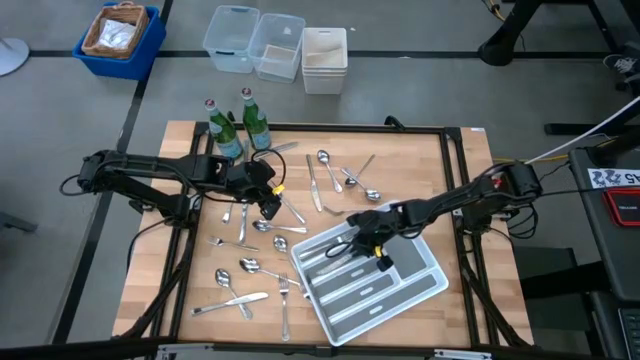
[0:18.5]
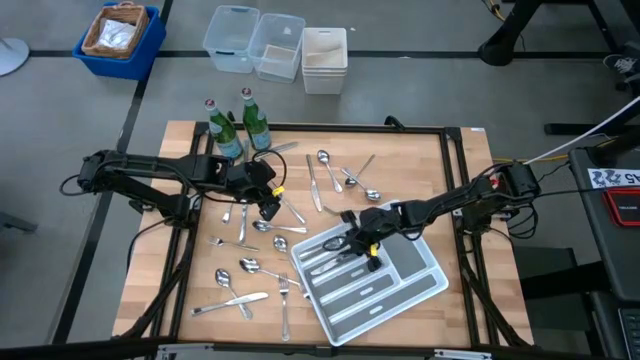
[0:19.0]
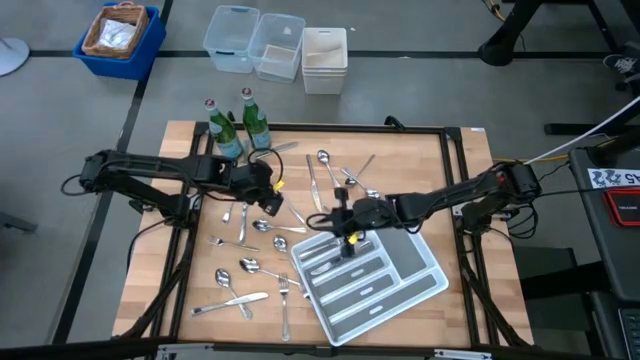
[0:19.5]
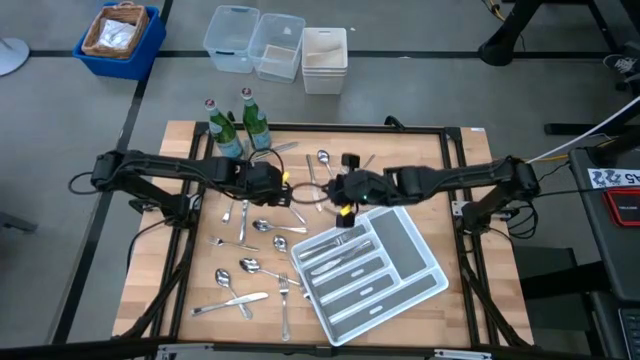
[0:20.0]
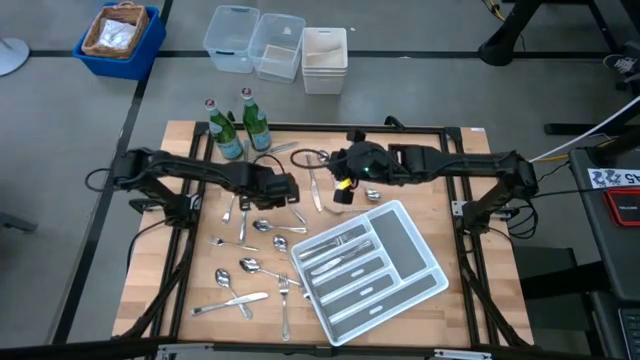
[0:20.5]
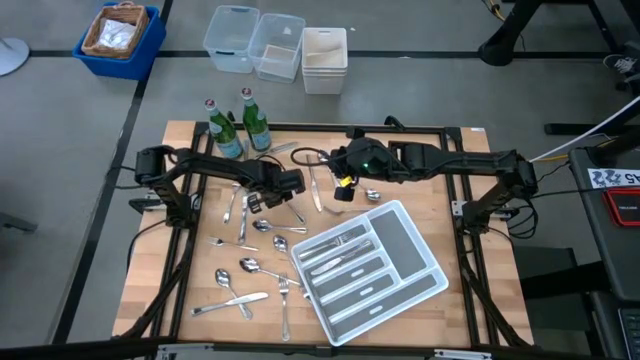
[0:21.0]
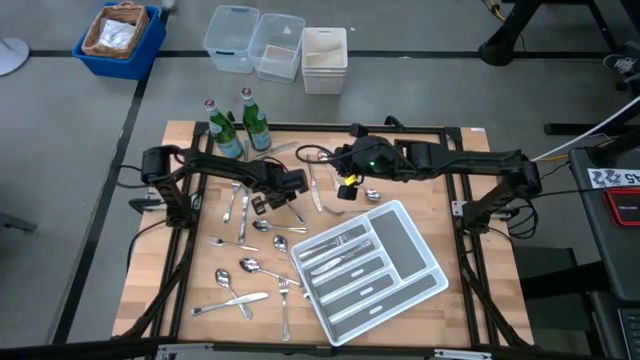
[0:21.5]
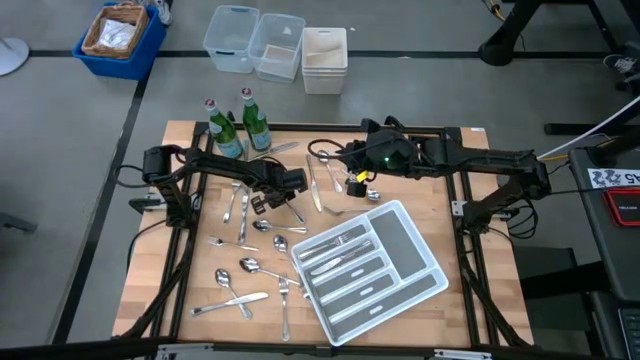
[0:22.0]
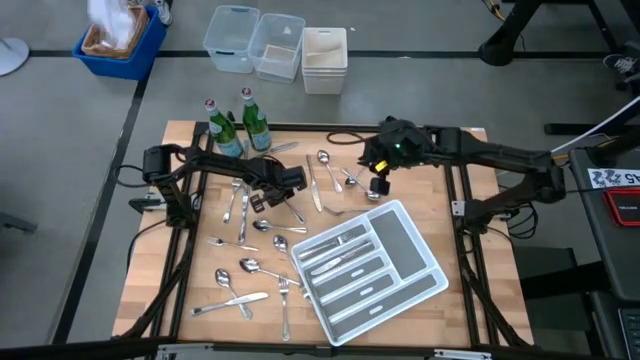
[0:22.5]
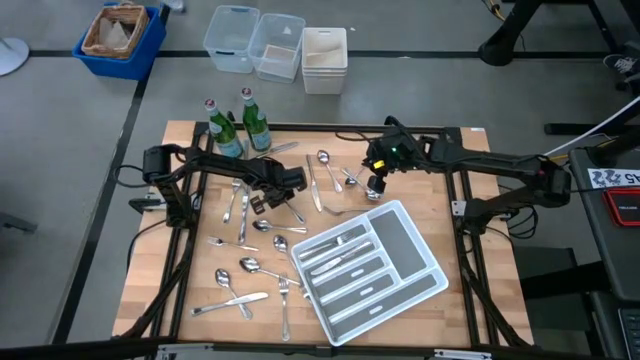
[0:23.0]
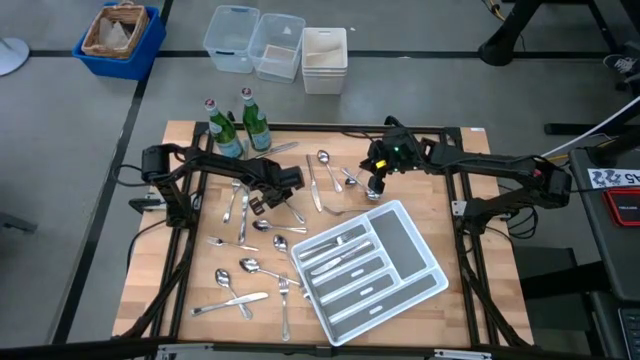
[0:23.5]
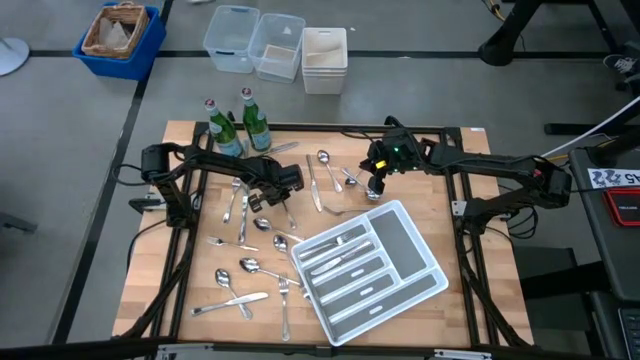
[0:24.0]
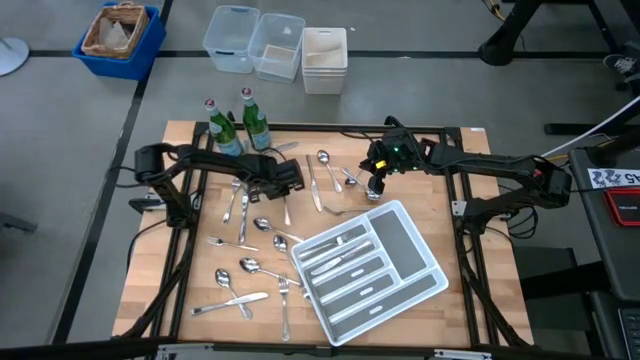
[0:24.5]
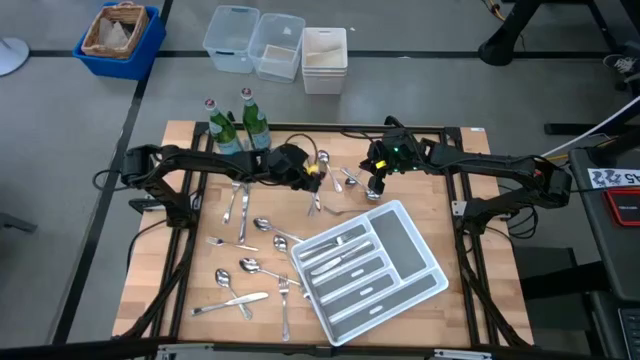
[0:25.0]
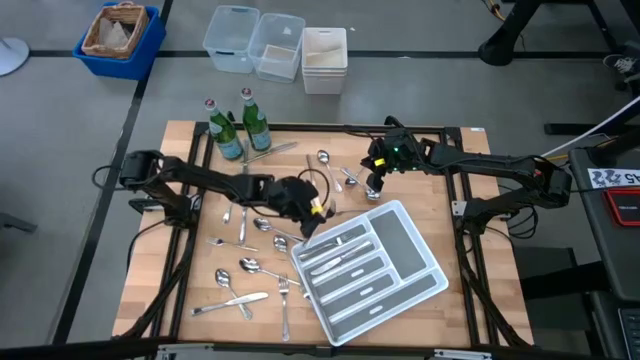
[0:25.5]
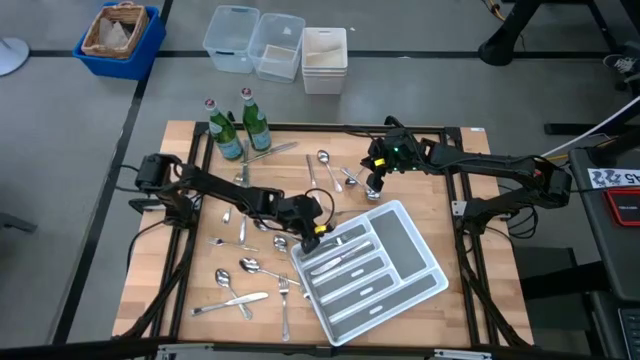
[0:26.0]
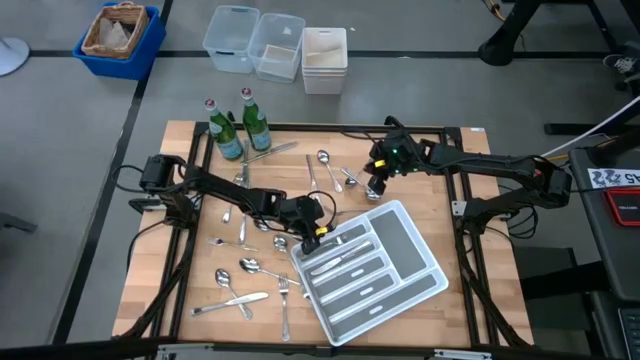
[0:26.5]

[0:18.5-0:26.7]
Task: Sort silverware
Put the silver fork into the white silverware tray

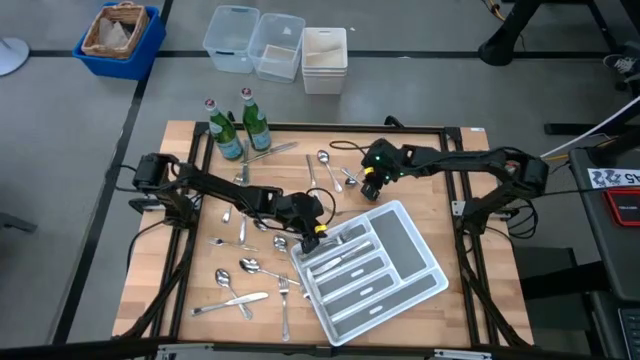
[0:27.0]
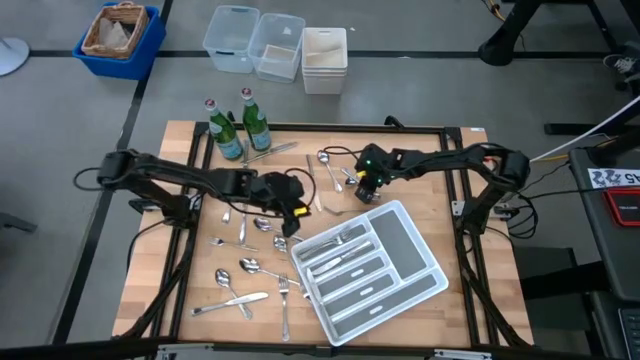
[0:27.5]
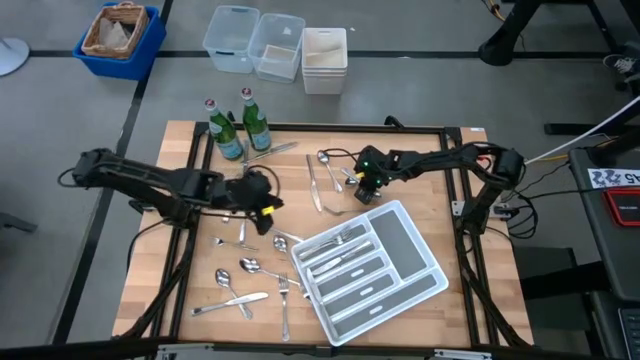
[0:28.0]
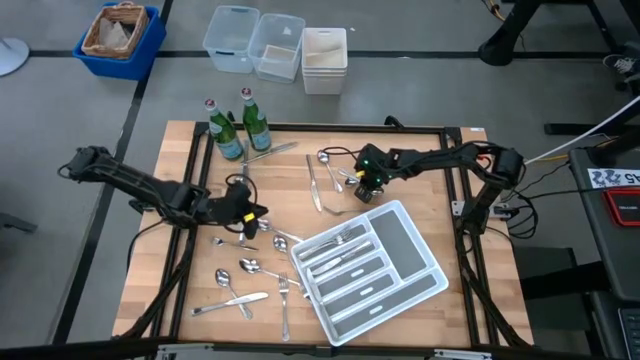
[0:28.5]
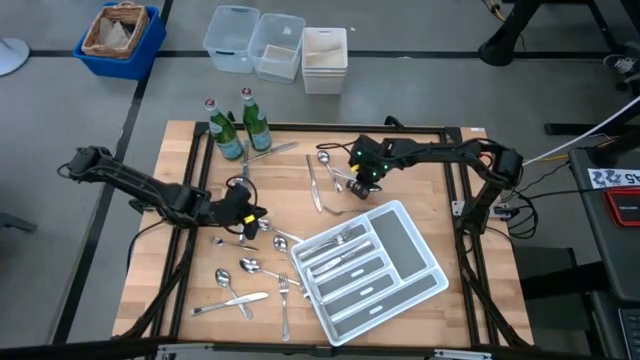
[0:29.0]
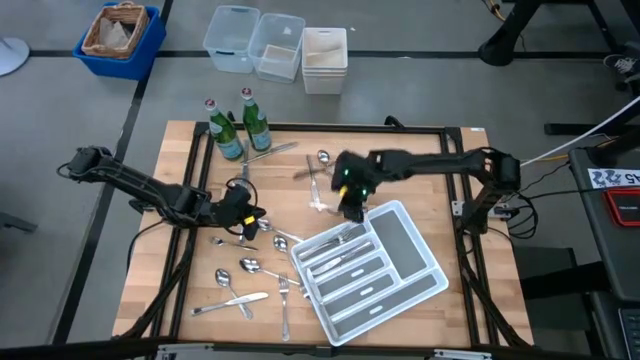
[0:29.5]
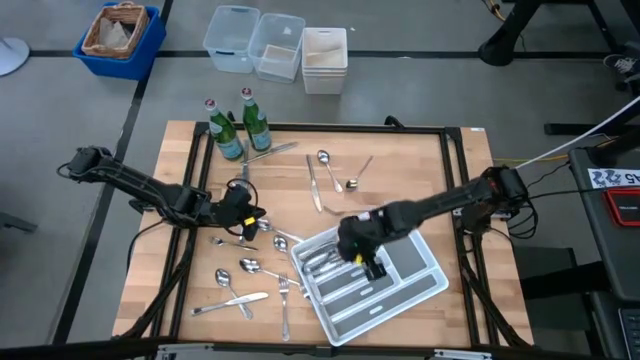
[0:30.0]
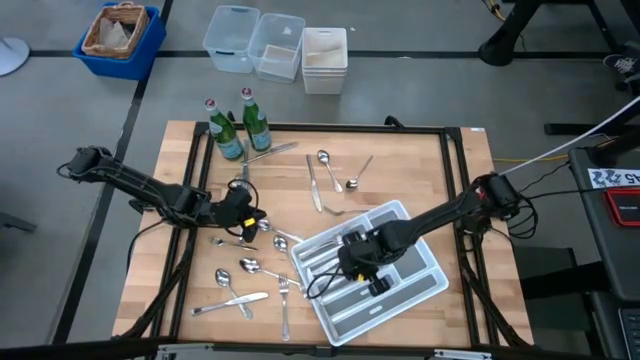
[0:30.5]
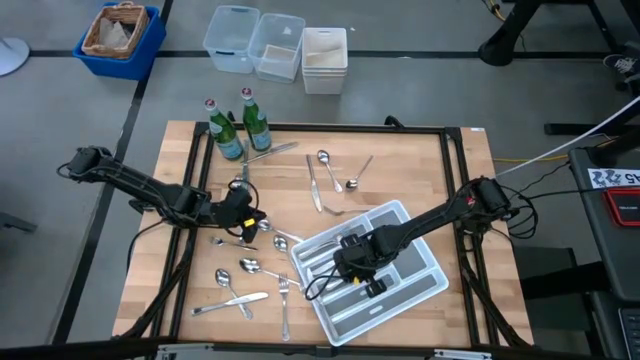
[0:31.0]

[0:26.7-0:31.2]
Put the silver spoon into the white silverware tray

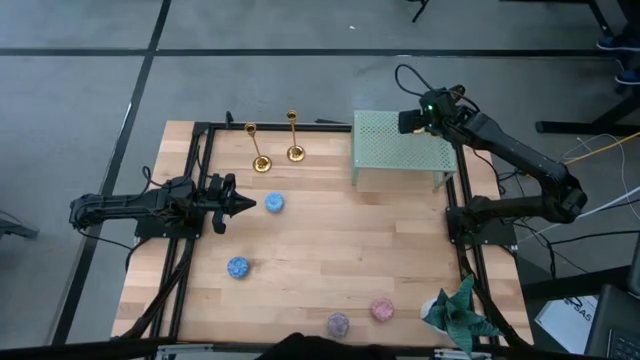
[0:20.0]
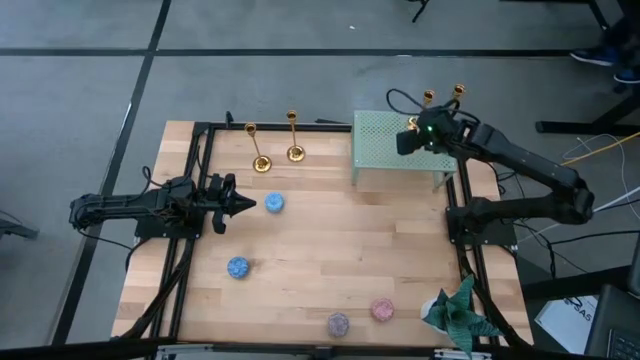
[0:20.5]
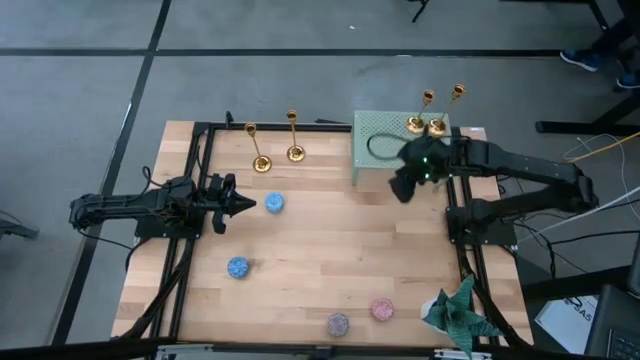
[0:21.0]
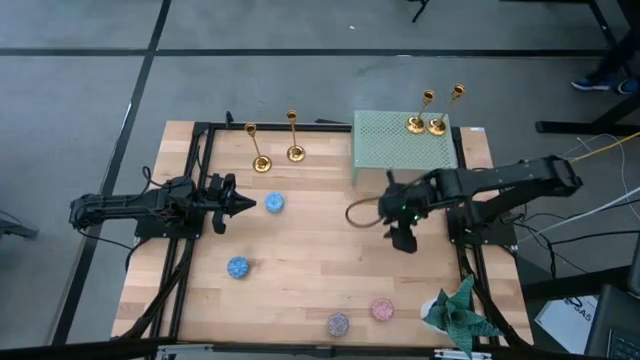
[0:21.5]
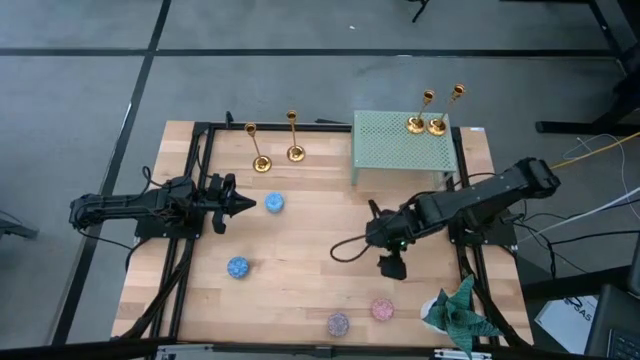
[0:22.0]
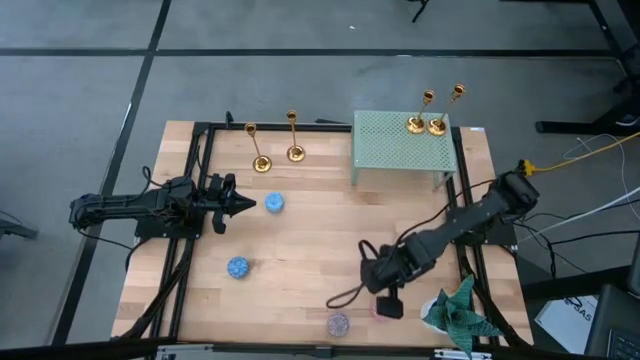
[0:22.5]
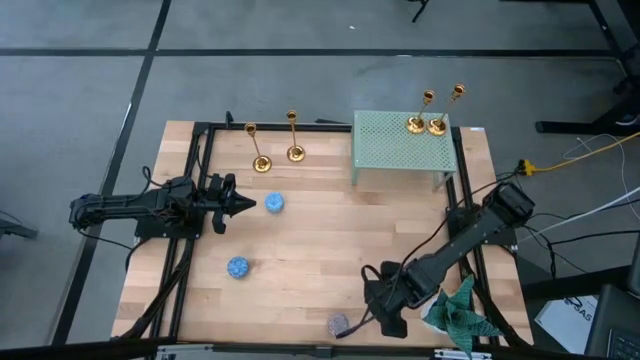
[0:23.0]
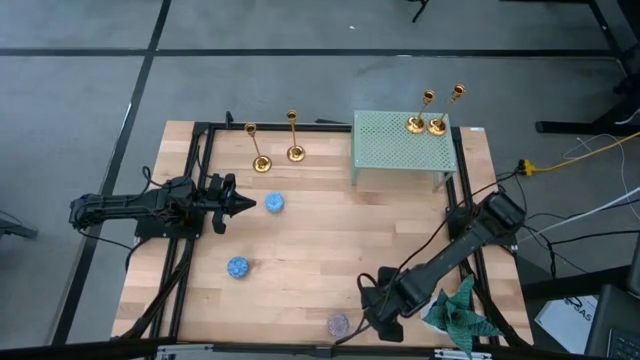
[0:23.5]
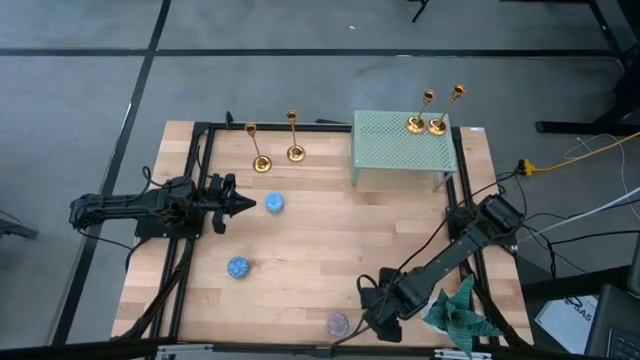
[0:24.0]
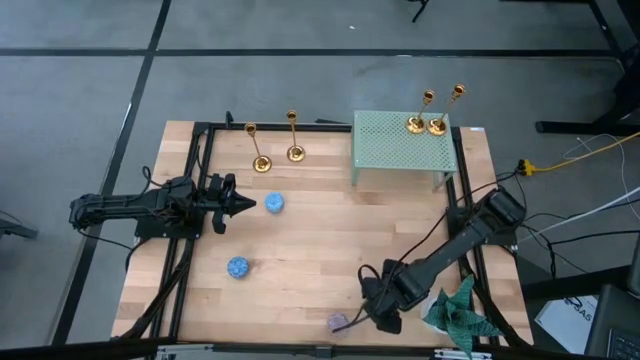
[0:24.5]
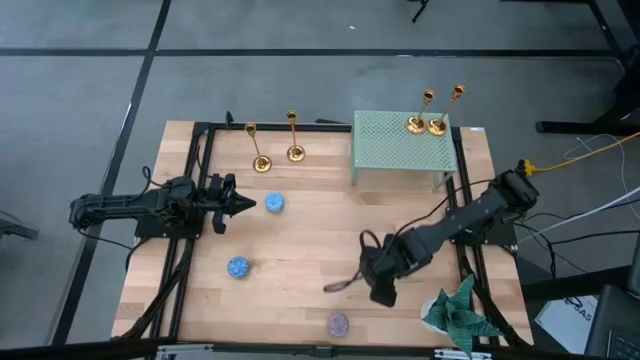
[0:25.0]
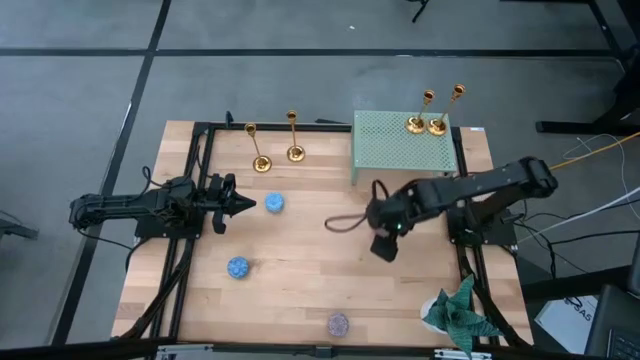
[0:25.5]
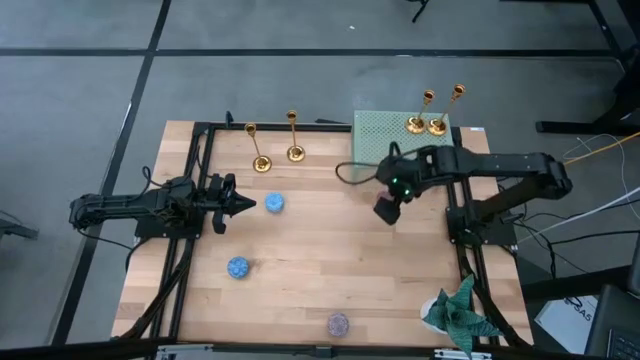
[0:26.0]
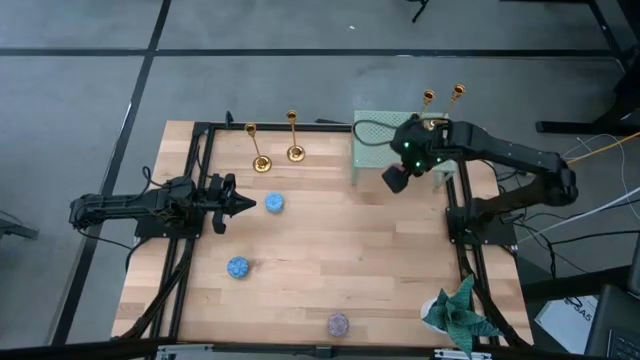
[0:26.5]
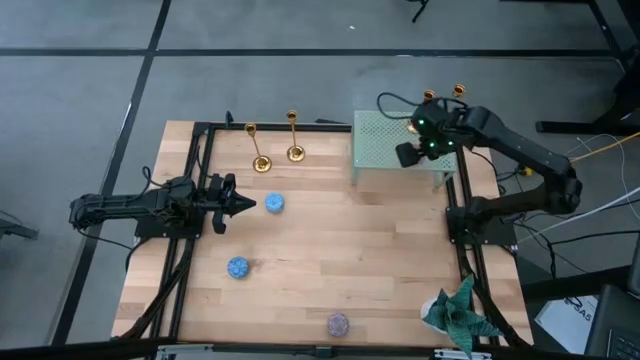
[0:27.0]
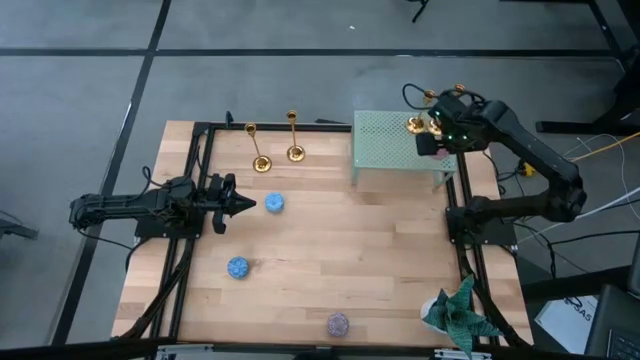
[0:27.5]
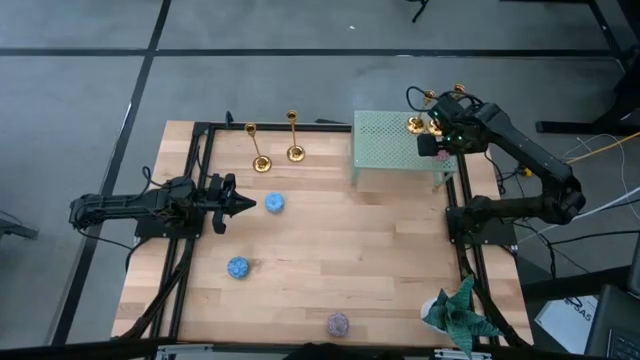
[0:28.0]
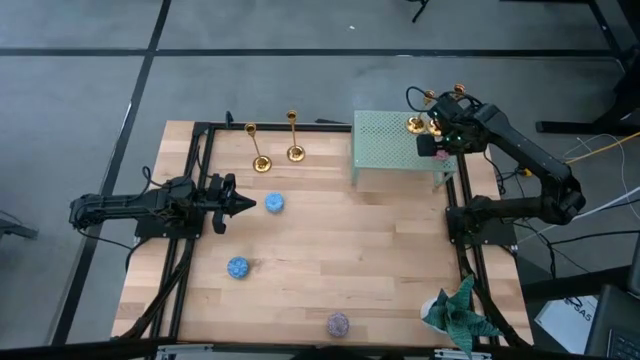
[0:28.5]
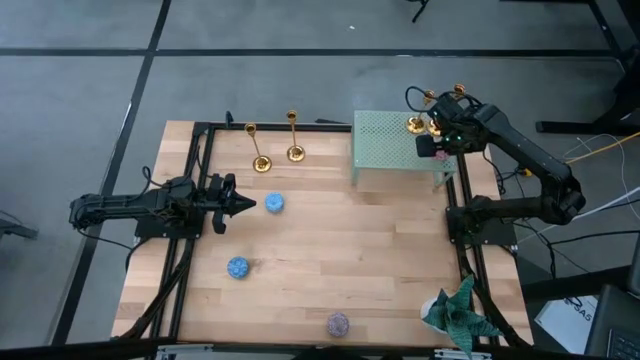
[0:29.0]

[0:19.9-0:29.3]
Task: Pick & Place candle stick holders
Put the gold pink scented candle on the shelf
